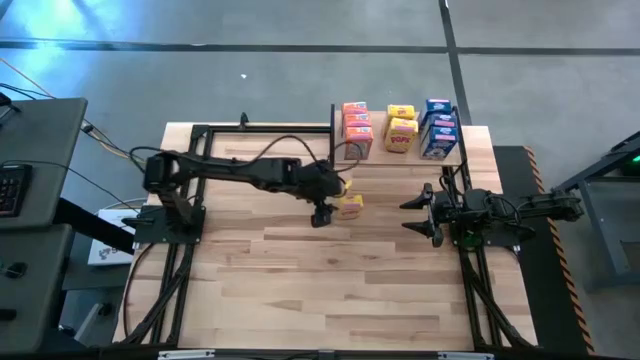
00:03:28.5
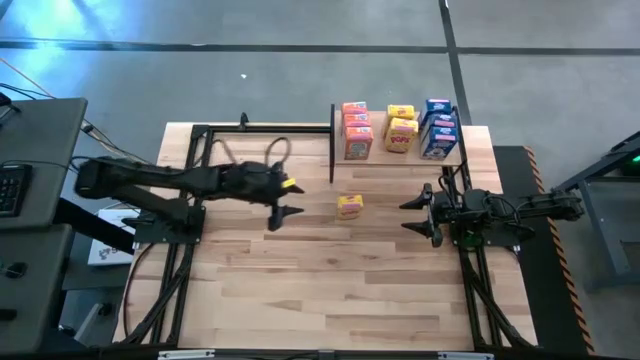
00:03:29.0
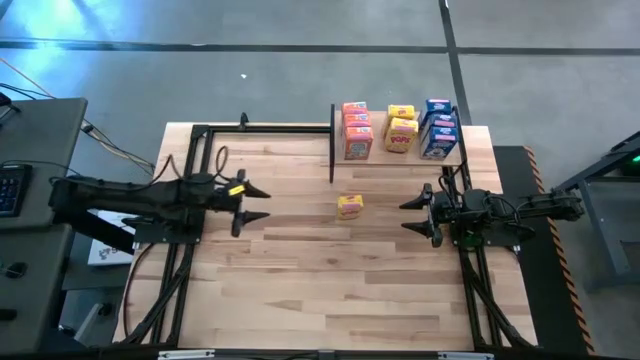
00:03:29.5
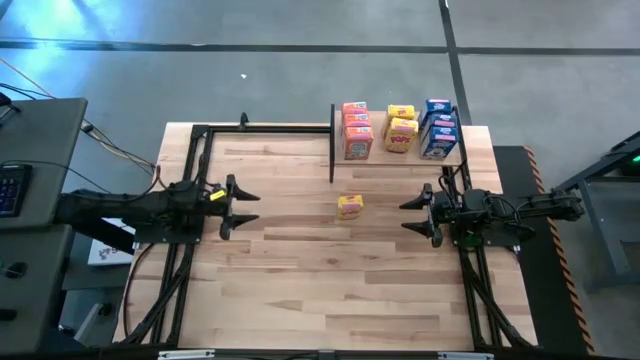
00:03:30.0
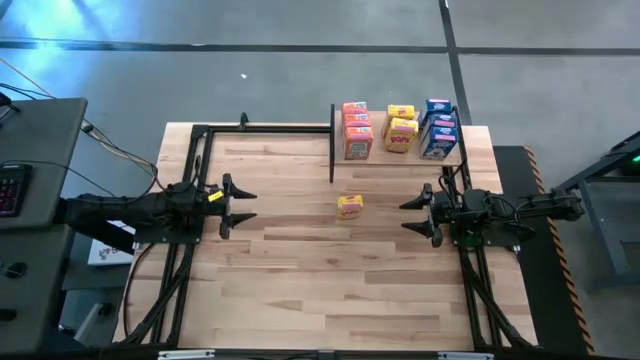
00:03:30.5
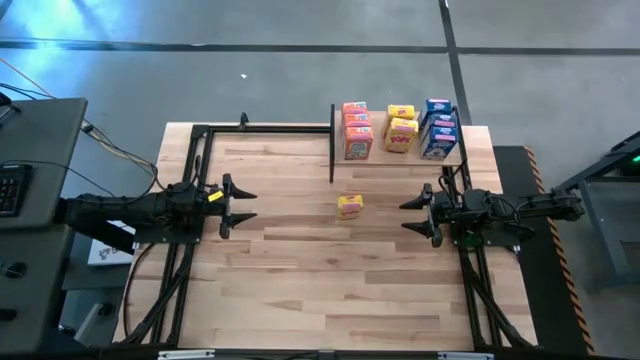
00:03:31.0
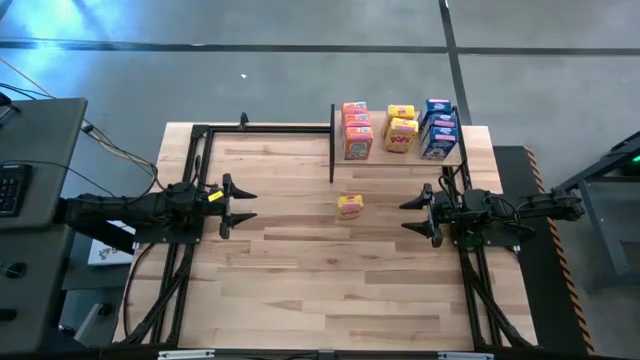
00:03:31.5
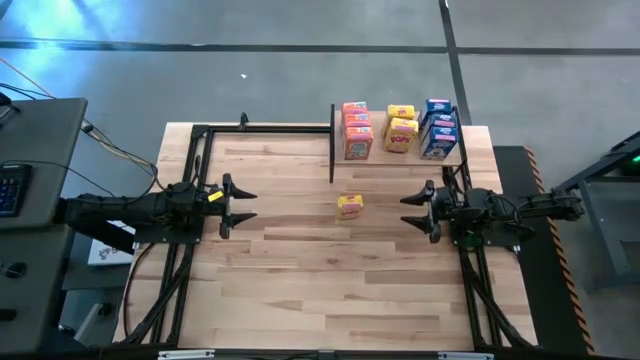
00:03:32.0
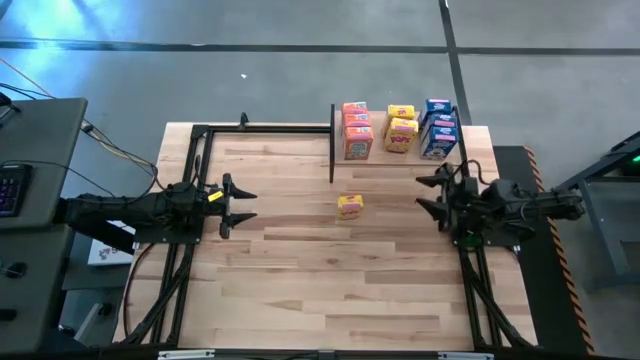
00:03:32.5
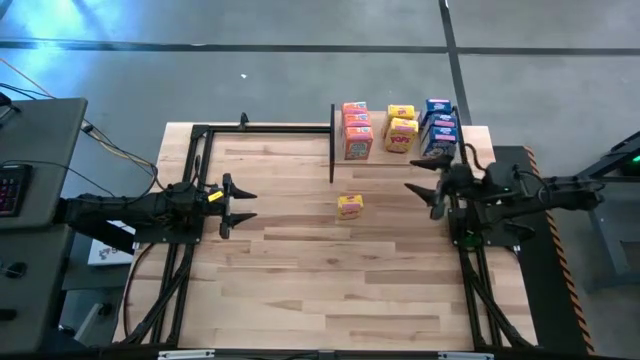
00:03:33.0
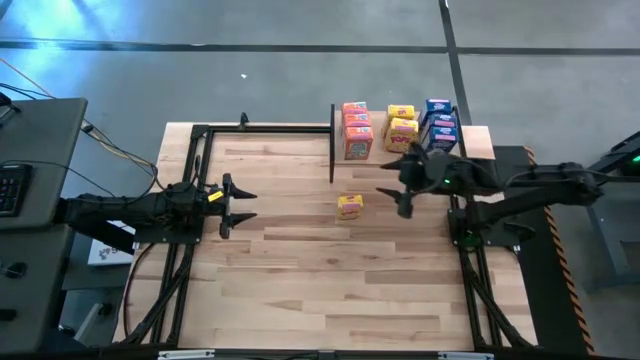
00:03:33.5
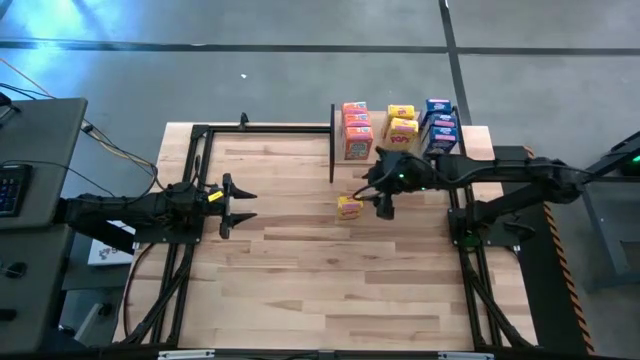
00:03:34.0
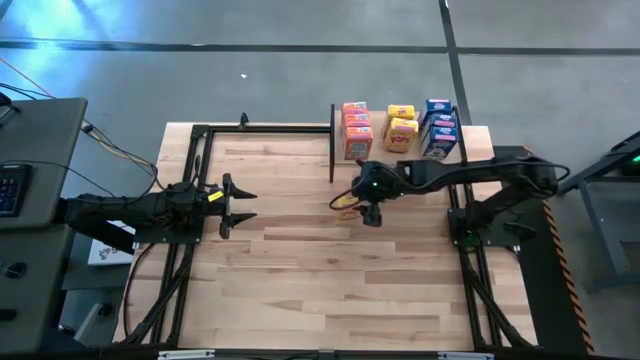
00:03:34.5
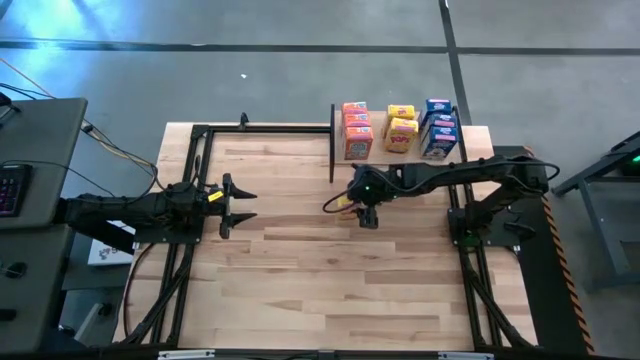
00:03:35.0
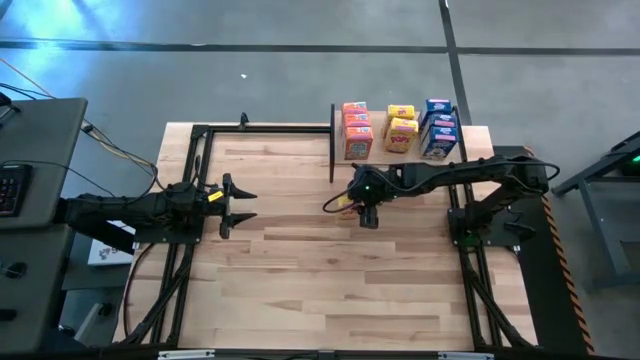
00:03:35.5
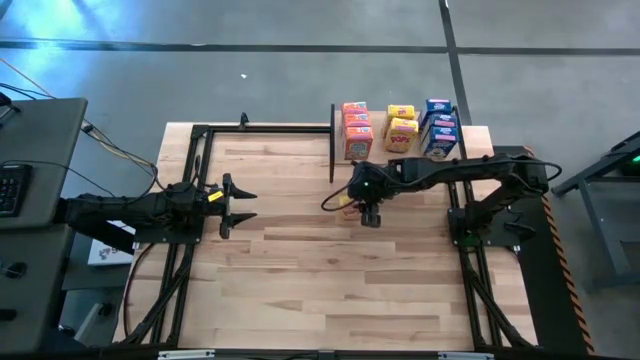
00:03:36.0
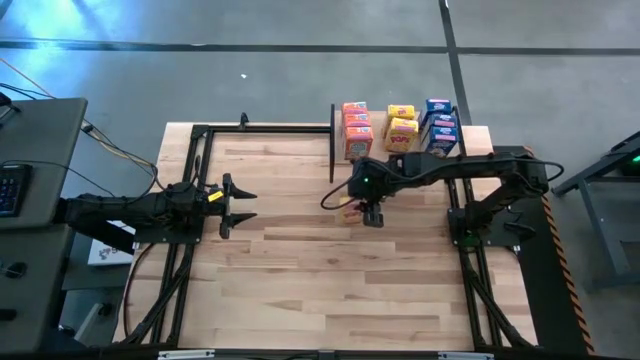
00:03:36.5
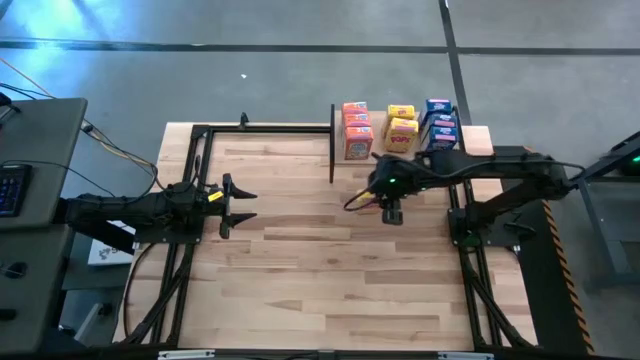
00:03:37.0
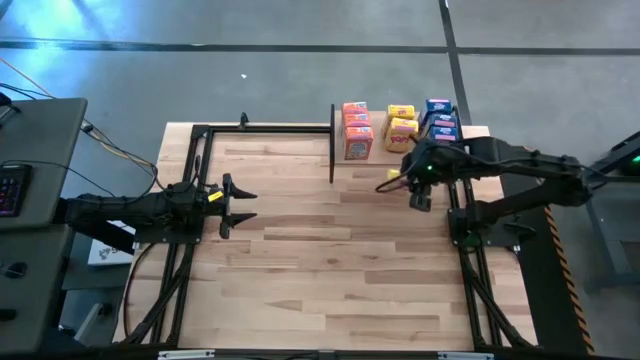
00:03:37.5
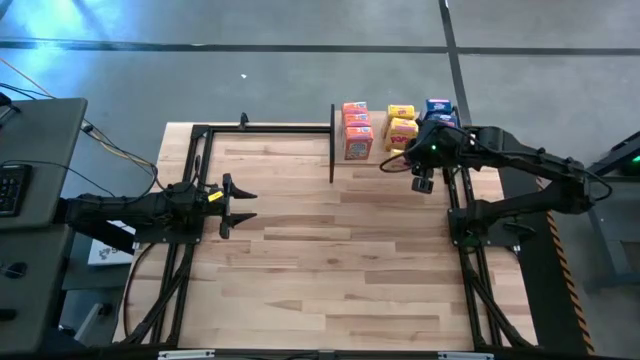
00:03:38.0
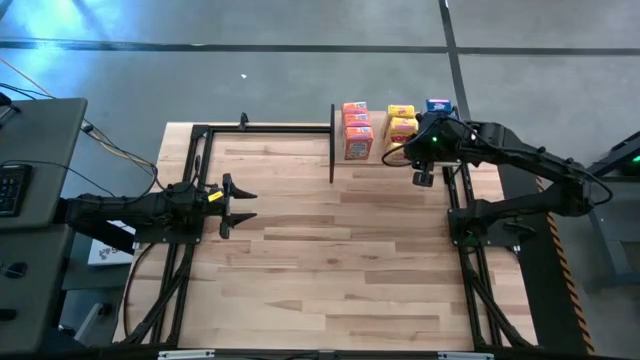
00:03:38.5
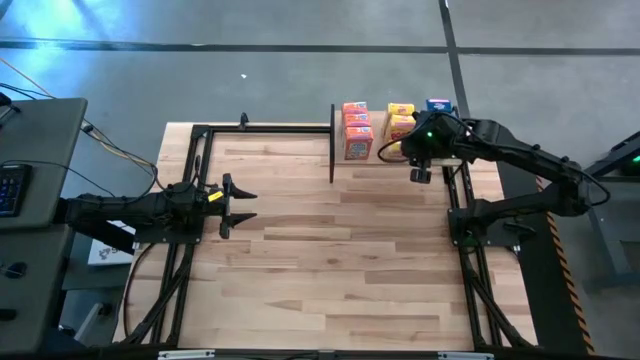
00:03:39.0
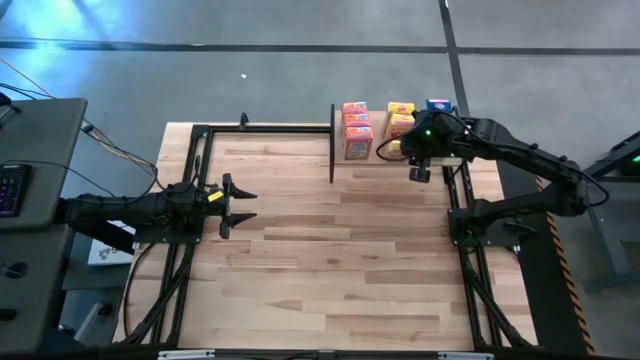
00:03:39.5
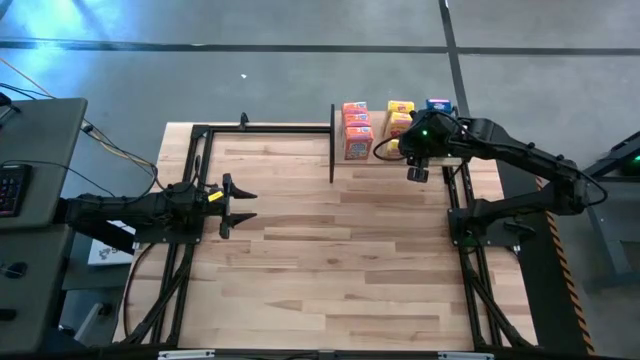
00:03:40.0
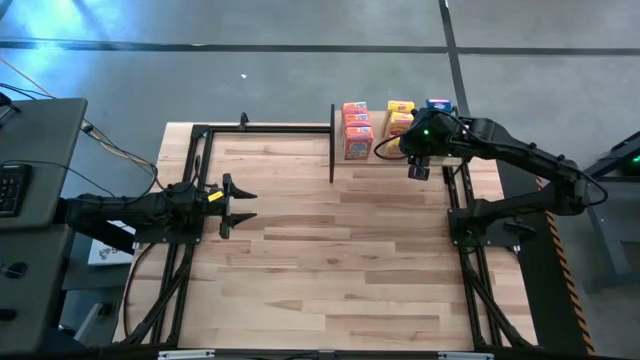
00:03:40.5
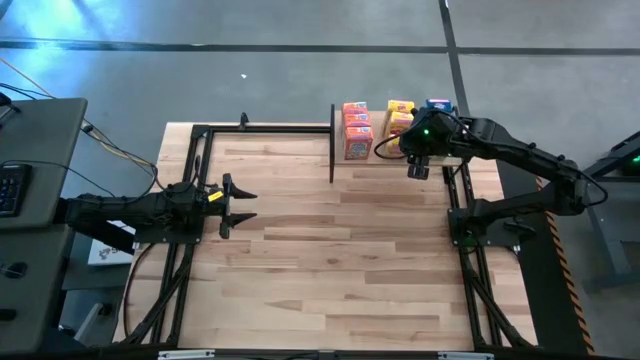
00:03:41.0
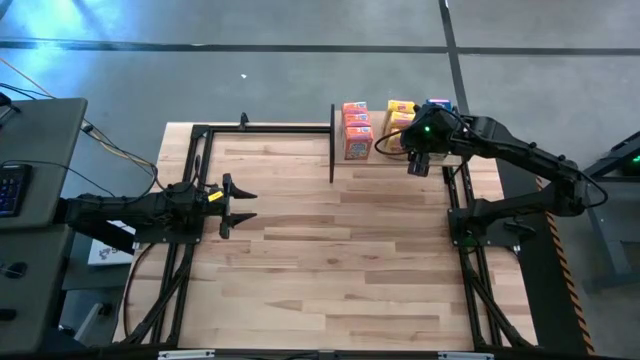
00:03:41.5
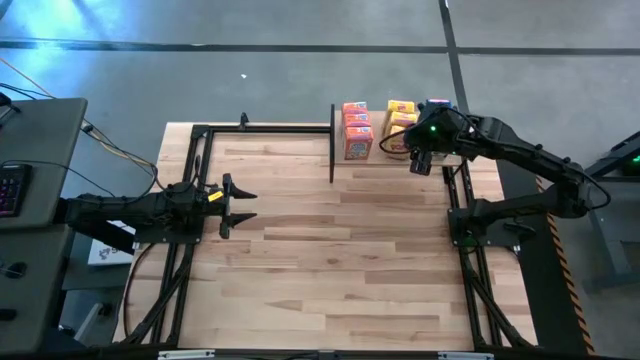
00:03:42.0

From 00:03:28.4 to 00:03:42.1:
Task: Stack cereal on shelf
Put the yellow cereal box on the shelf aligned with the other yellow cereal boxes

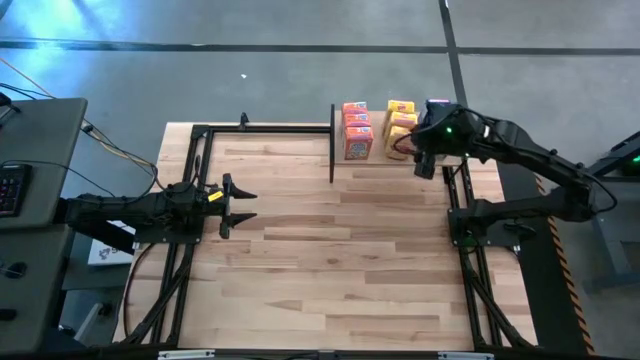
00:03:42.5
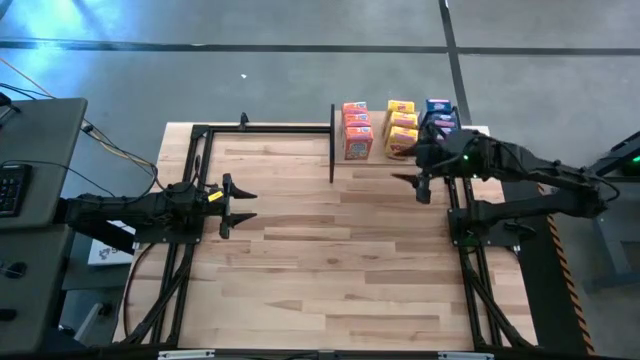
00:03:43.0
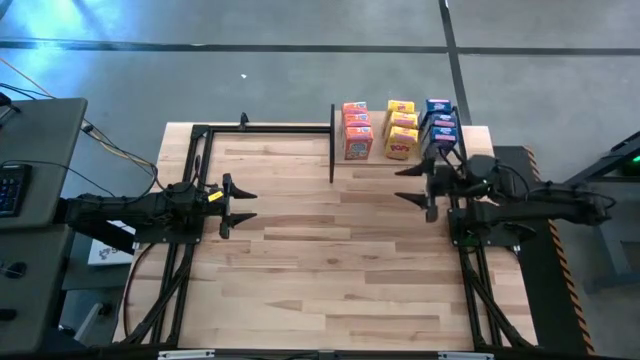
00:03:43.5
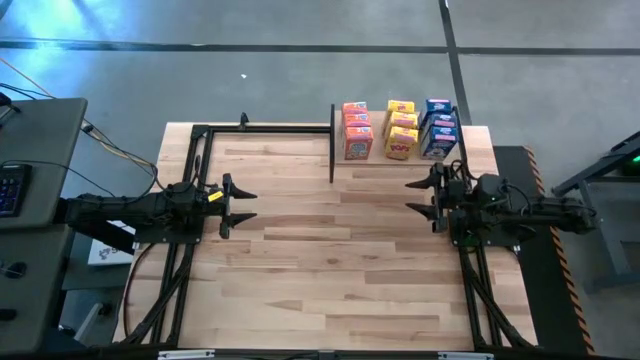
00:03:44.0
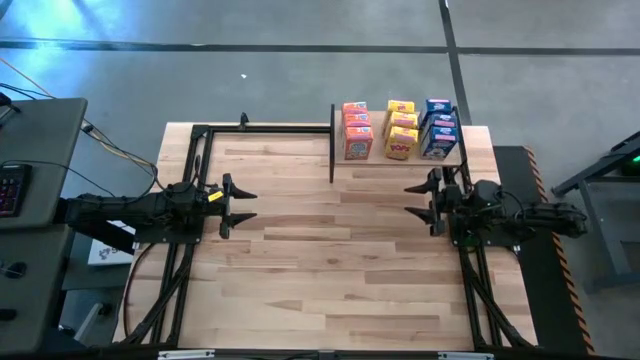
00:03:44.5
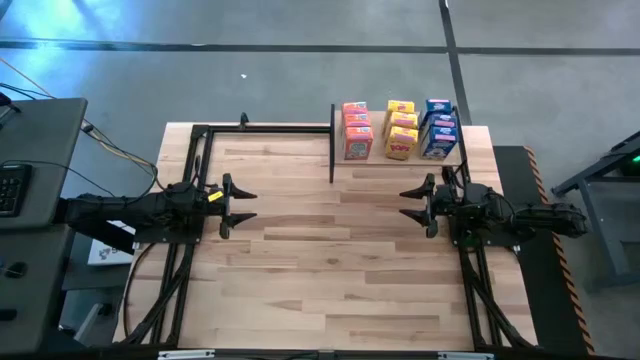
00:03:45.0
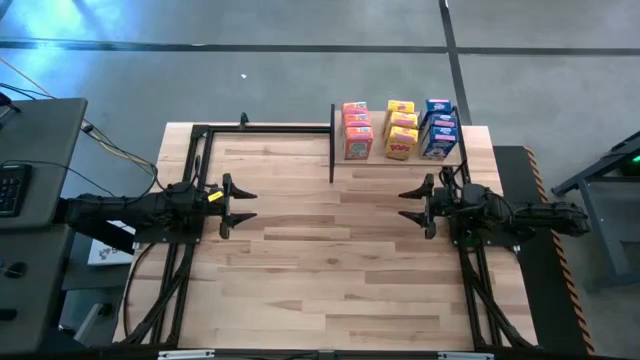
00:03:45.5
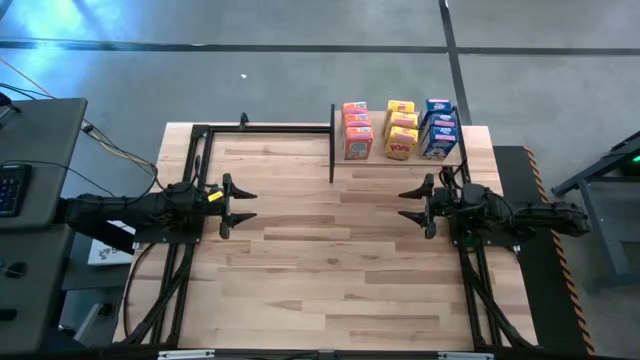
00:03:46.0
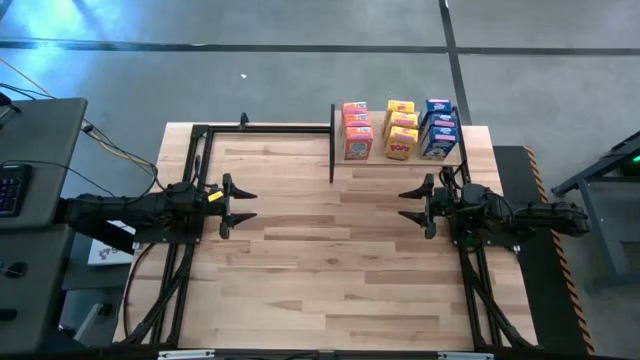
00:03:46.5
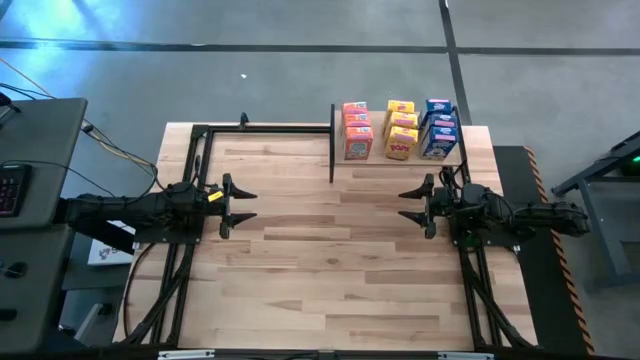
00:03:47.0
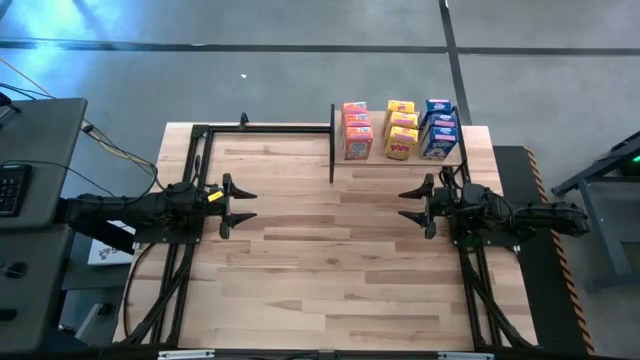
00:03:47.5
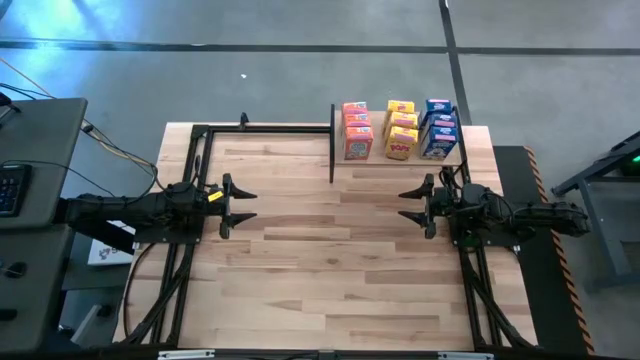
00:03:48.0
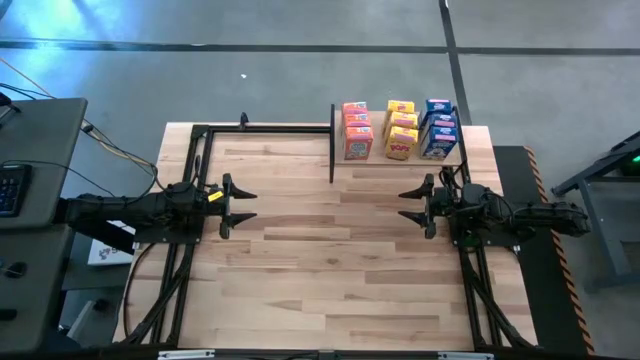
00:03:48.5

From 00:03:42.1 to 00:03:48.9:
Return to Home Position
